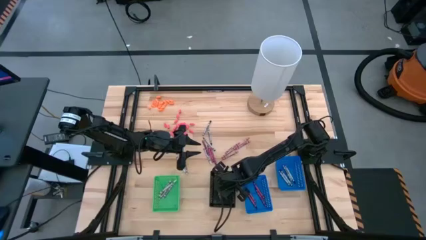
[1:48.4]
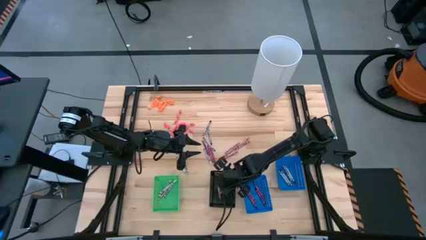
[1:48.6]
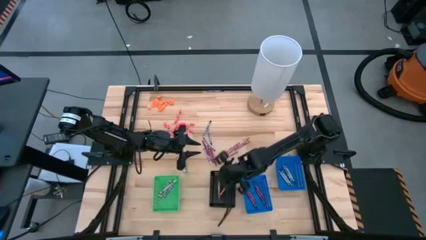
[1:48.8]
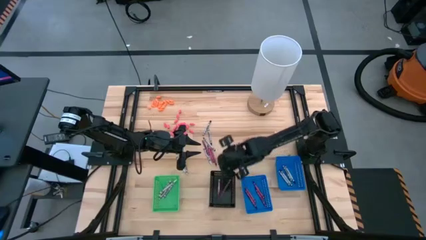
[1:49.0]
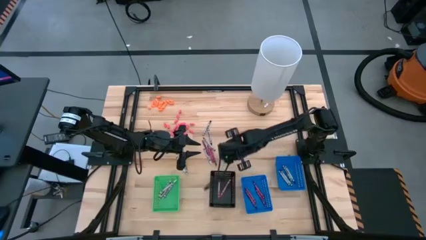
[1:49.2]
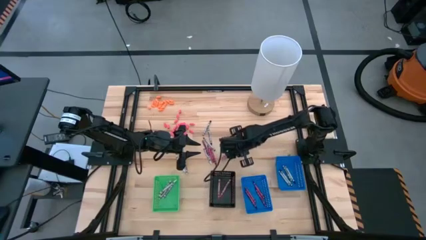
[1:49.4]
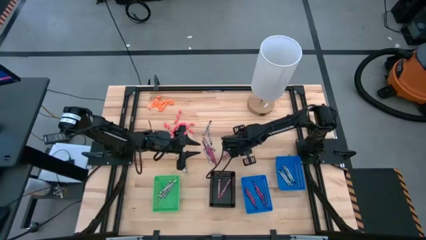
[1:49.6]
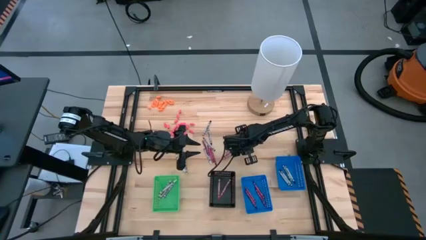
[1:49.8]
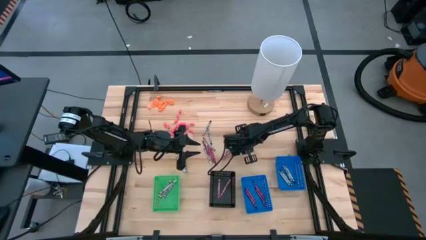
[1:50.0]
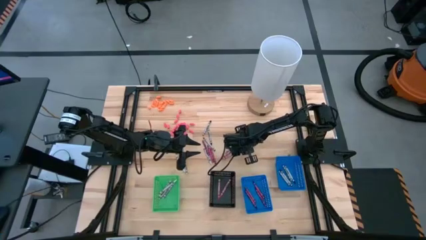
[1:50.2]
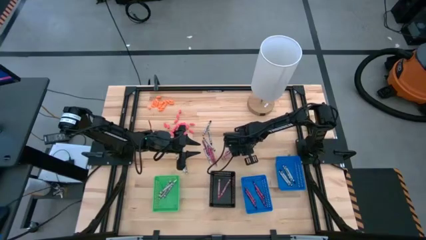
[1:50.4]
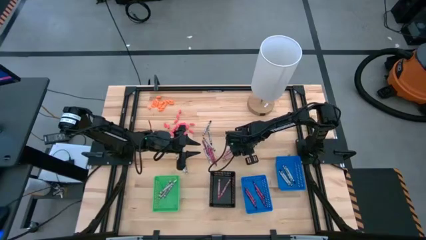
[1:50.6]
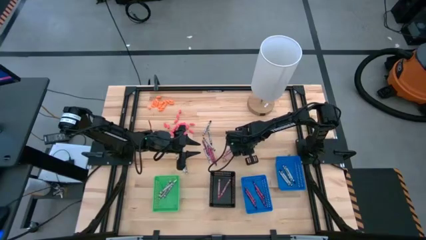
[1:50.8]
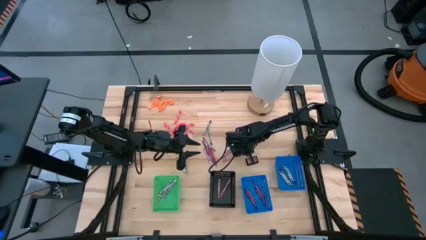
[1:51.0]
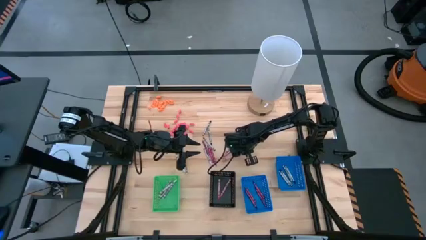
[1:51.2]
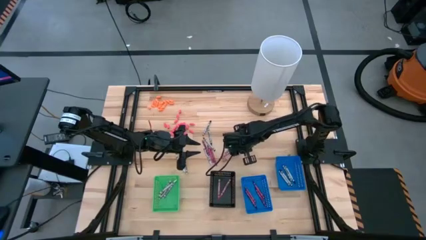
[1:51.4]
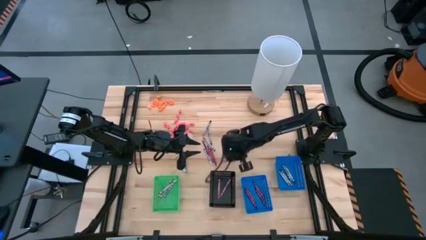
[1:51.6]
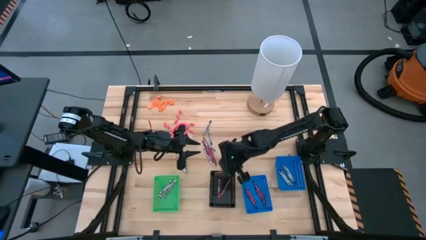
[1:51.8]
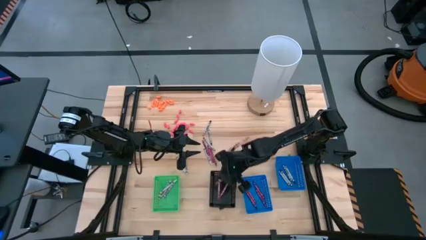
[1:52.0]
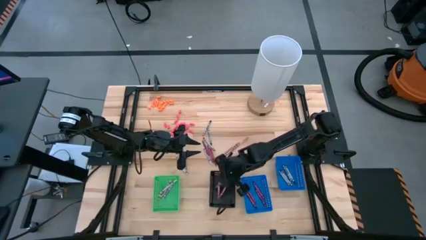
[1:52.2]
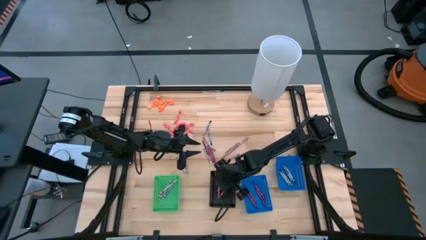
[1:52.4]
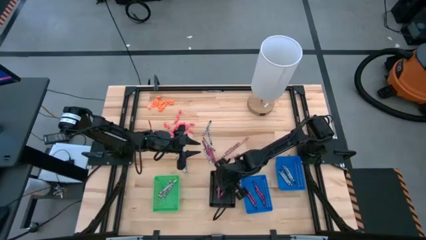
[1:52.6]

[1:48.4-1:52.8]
Task: Sort crayons
Put the pink crayon into the black bin

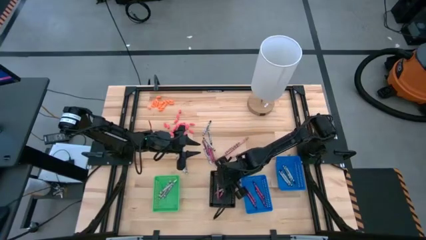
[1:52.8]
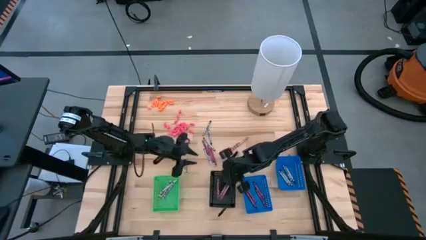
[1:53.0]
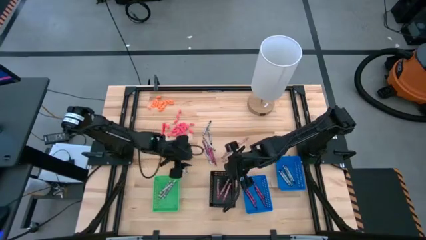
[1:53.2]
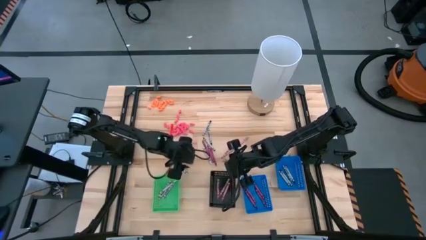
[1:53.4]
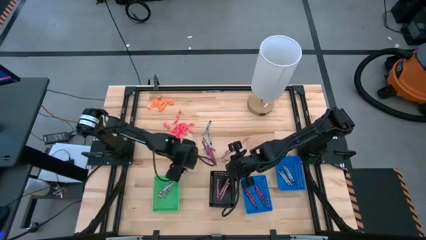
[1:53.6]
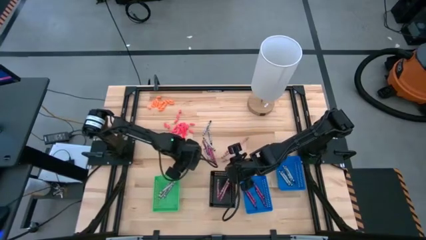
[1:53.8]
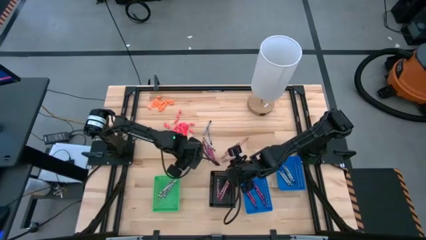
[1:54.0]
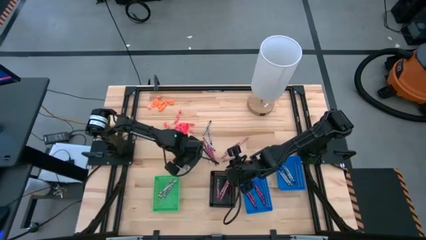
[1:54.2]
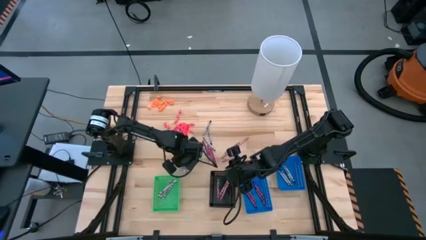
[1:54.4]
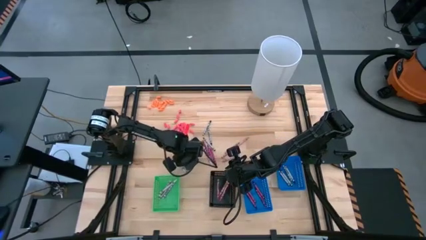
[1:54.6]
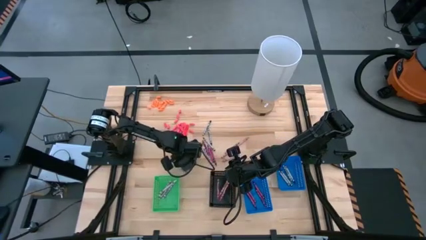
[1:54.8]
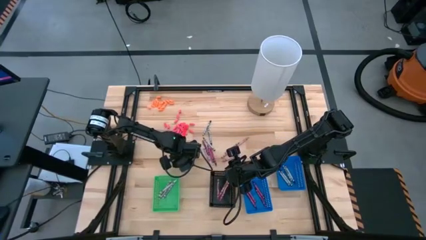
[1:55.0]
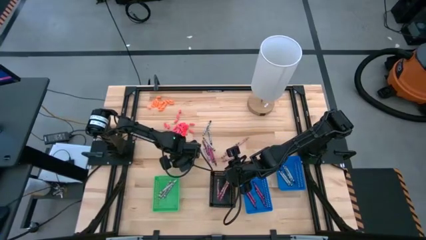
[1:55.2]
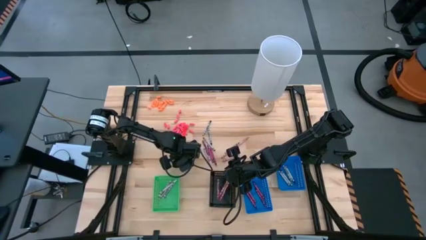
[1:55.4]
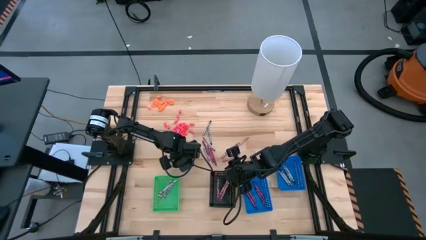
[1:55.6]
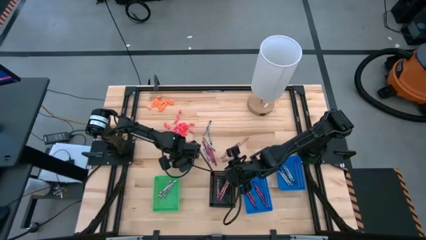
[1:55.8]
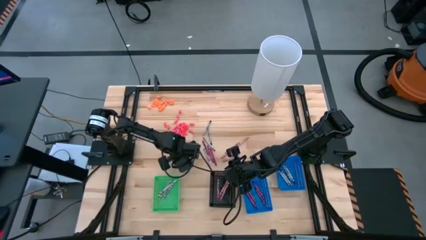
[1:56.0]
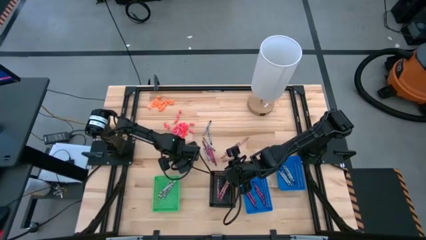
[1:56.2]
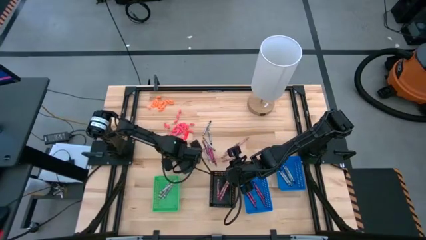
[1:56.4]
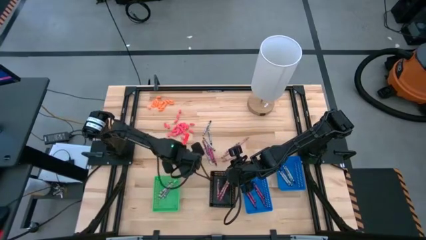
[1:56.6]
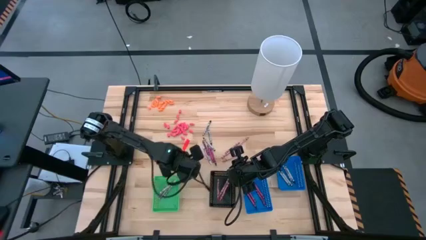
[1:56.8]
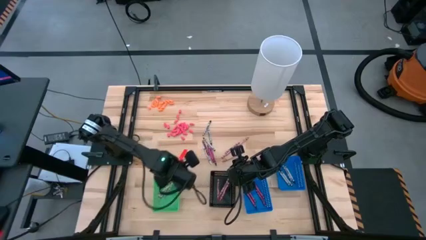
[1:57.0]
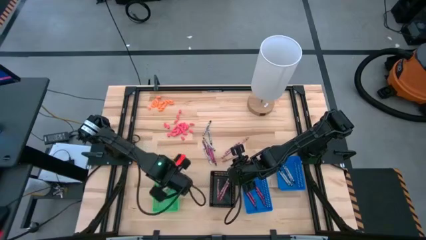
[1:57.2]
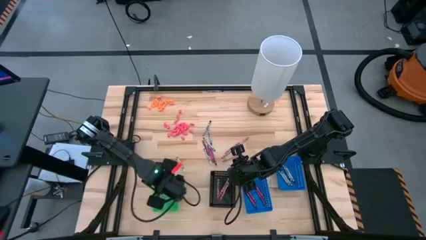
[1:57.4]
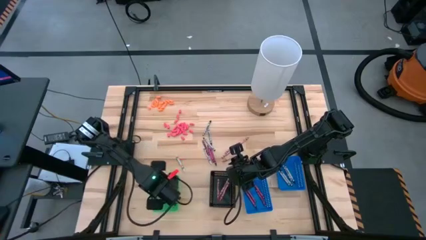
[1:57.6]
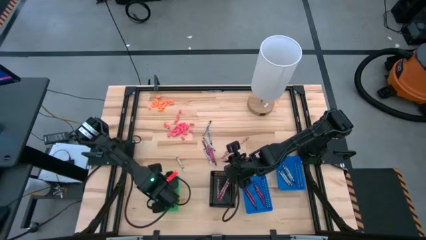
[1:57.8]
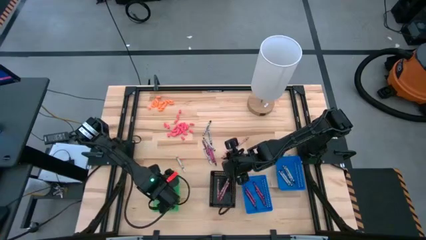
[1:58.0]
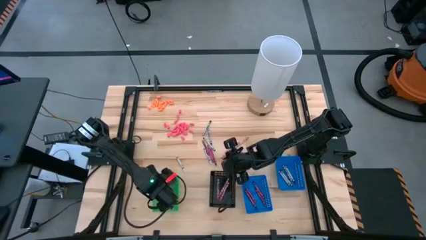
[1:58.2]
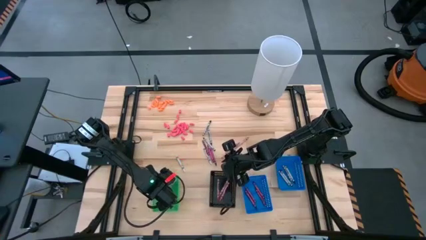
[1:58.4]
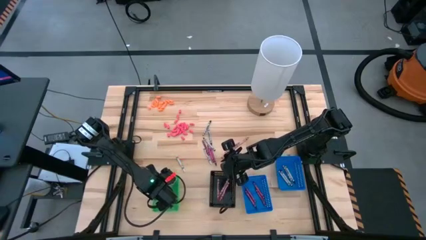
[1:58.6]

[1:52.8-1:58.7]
Put the white crayon into the green bin

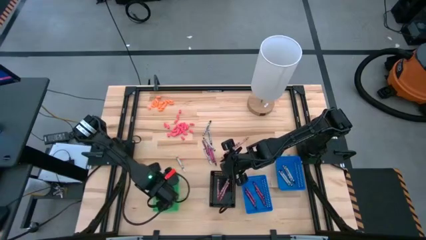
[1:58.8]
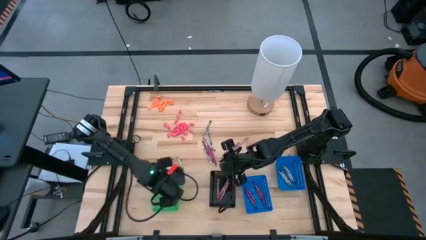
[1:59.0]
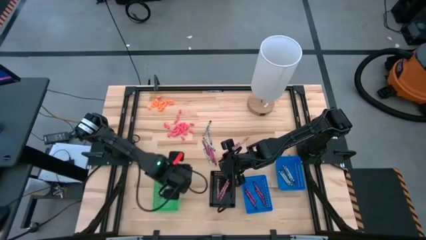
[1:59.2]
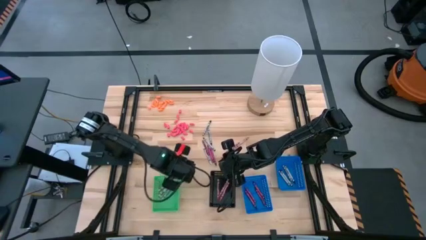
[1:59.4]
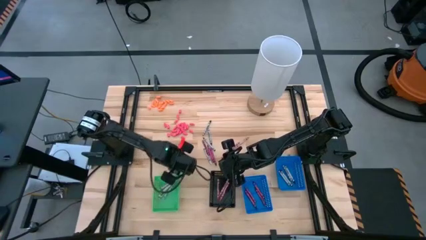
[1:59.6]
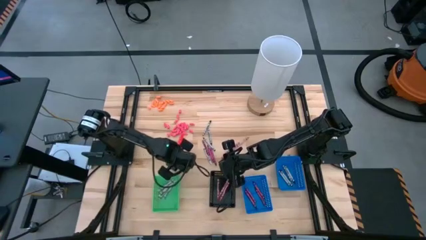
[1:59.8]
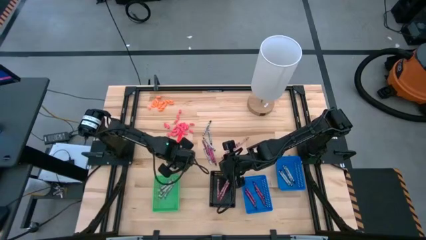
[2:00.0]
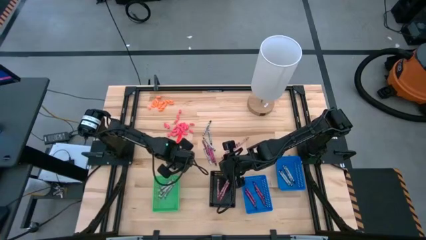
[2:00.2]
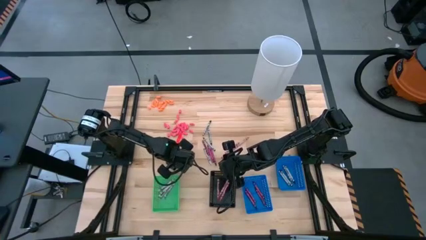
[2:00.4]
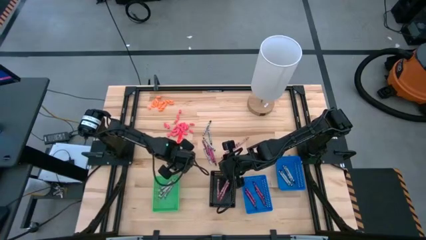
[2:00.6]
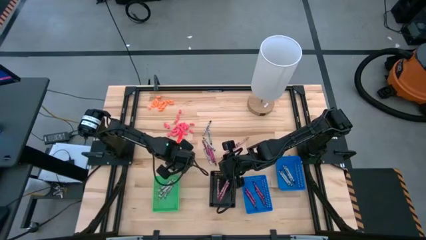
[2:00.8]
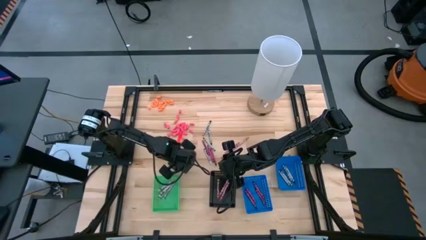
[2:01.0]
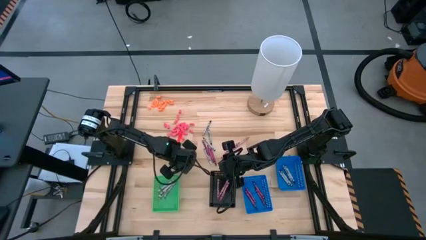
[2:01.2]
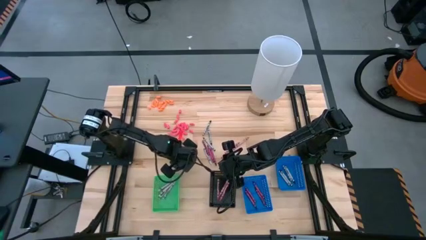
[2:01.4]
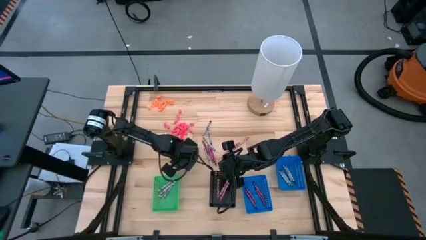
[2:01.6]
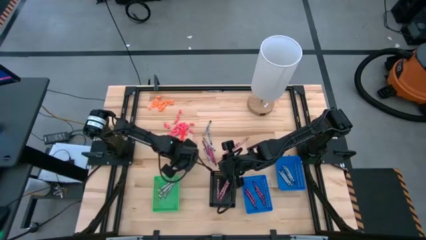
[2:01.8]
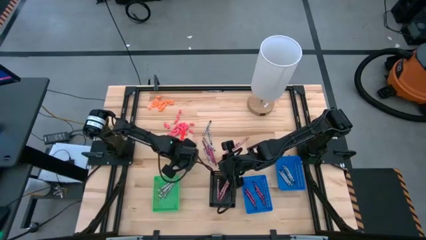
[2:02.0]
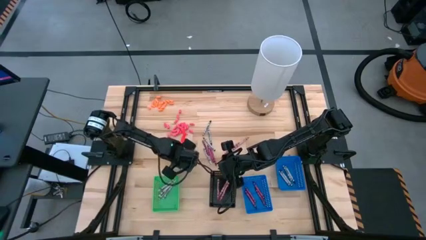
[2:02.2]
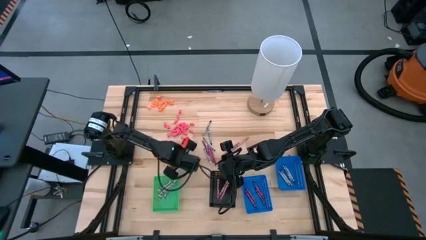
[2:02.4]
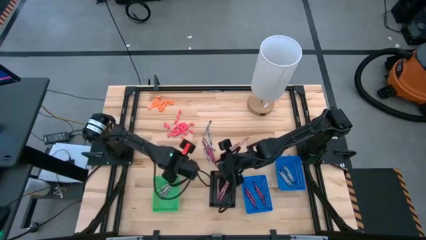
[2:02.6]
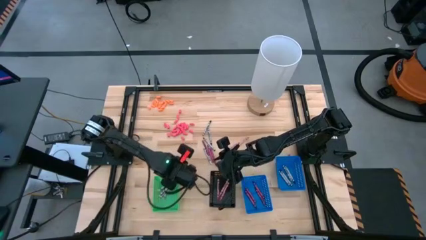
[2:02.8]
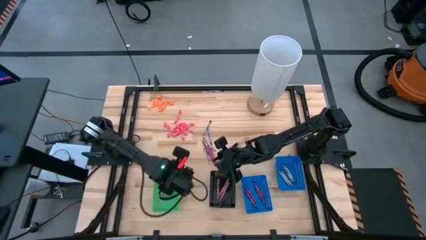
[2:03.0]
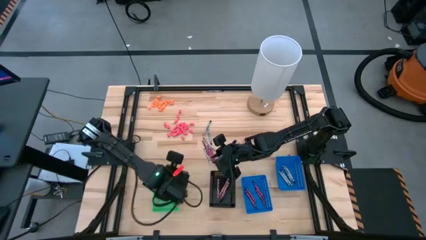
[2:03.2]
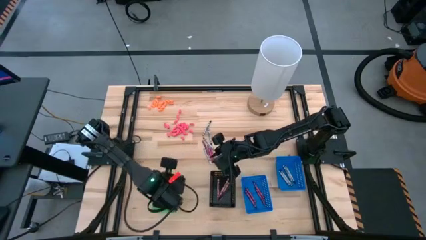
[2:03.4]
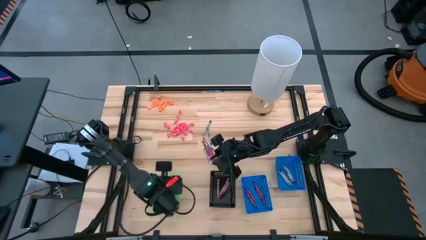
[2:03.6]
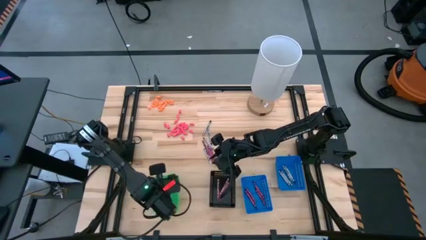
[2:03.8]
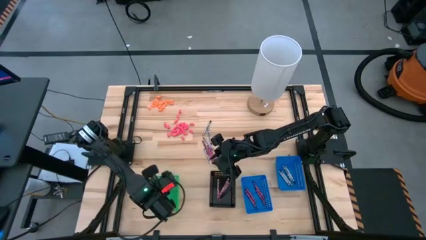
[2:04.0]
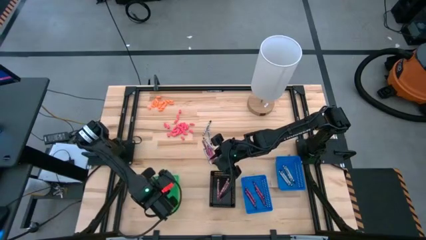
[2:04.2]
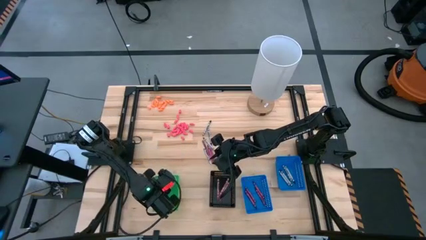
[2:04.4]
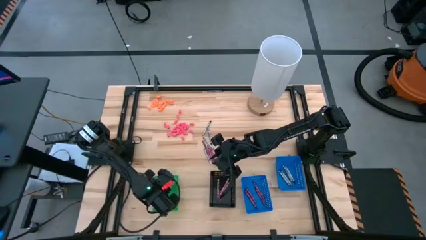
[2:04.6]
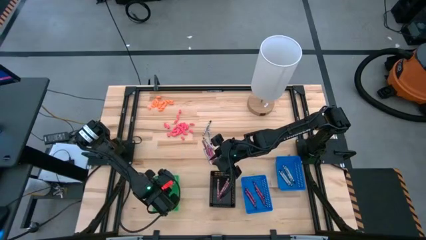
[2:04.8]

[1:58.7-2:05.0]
Put the white crayon into the green bin
